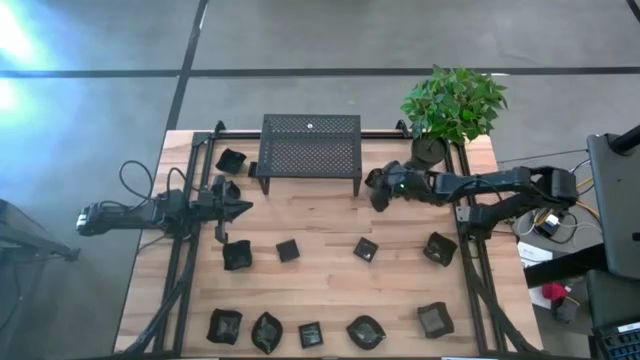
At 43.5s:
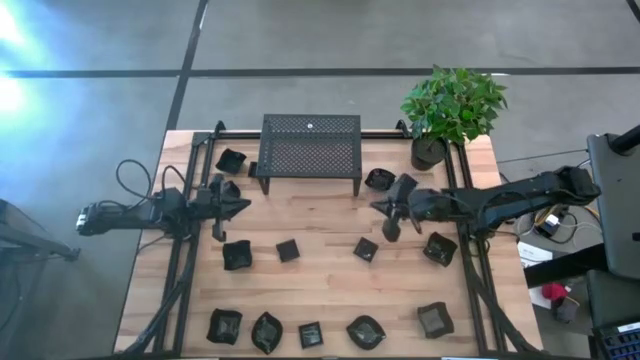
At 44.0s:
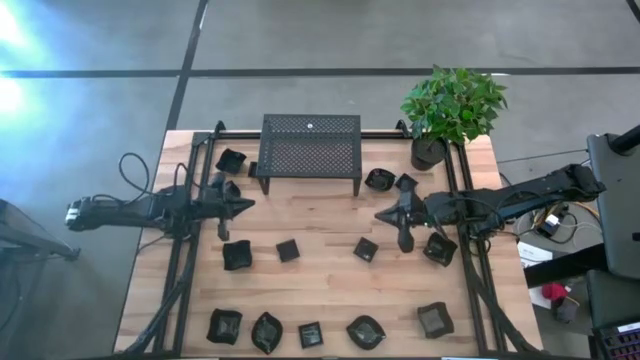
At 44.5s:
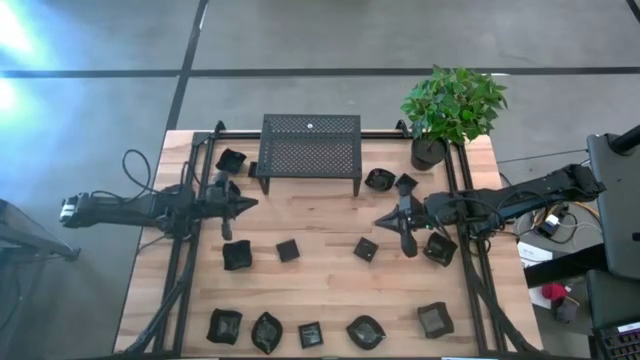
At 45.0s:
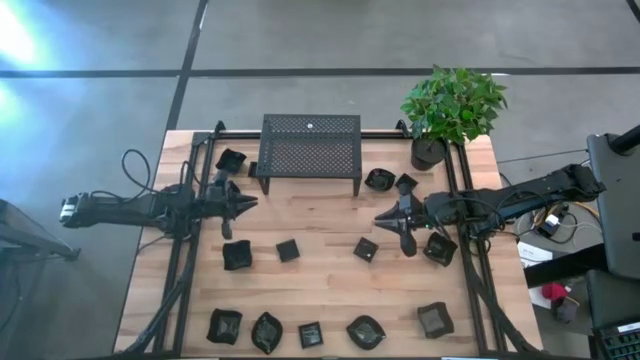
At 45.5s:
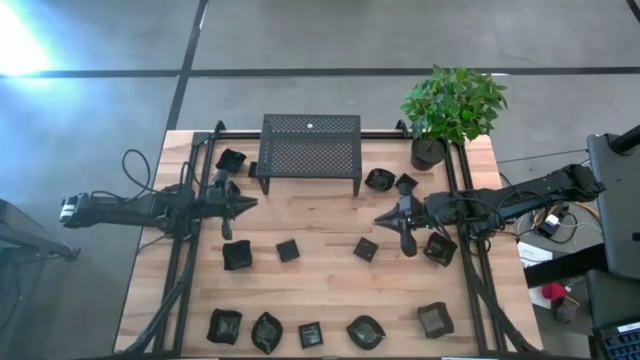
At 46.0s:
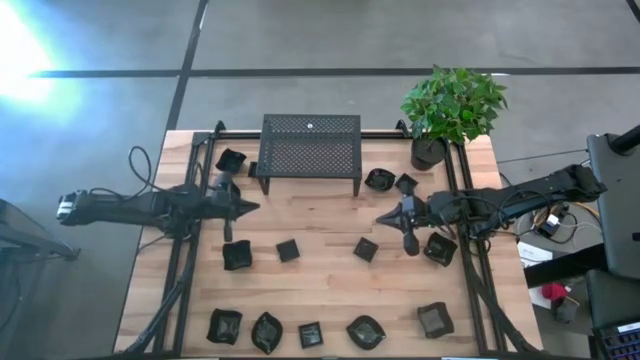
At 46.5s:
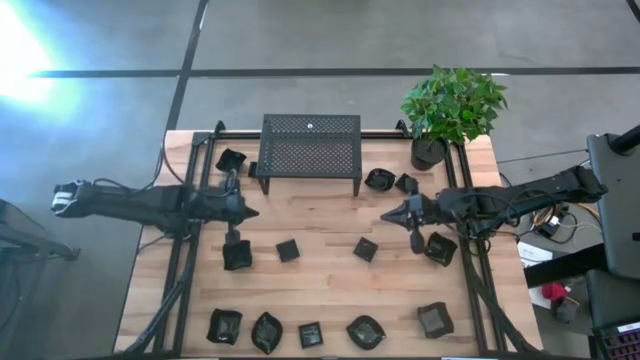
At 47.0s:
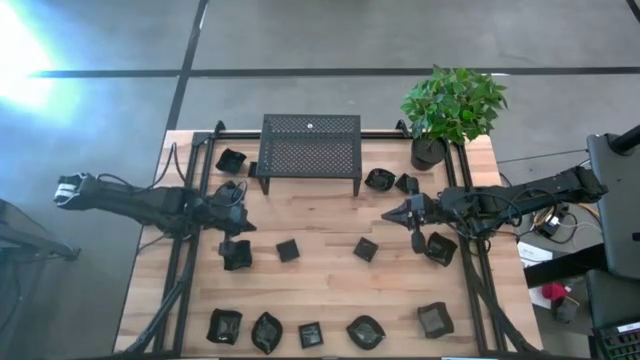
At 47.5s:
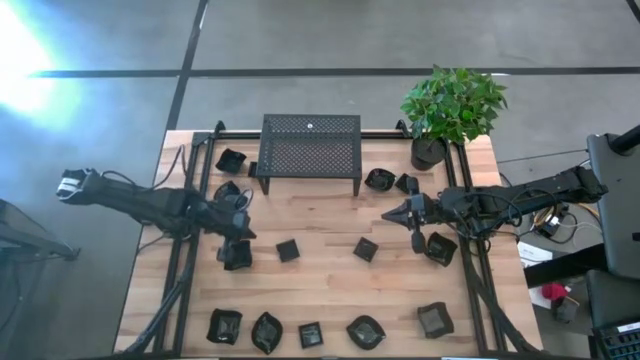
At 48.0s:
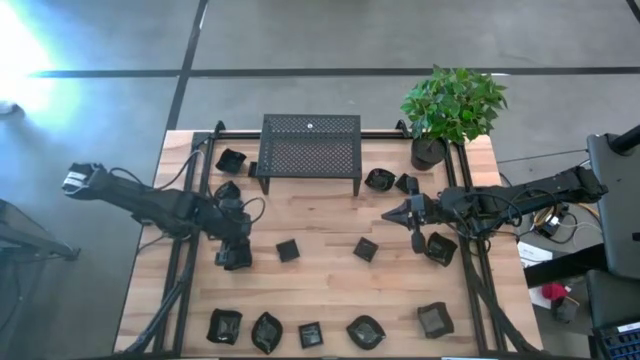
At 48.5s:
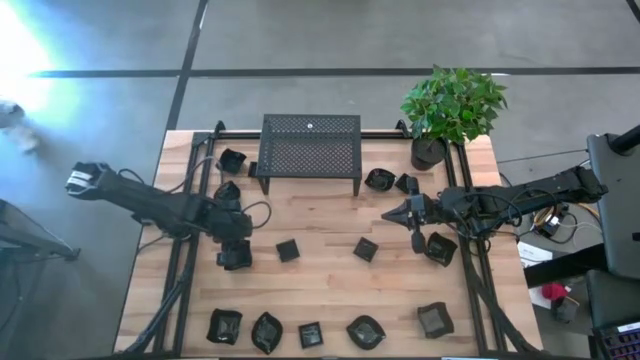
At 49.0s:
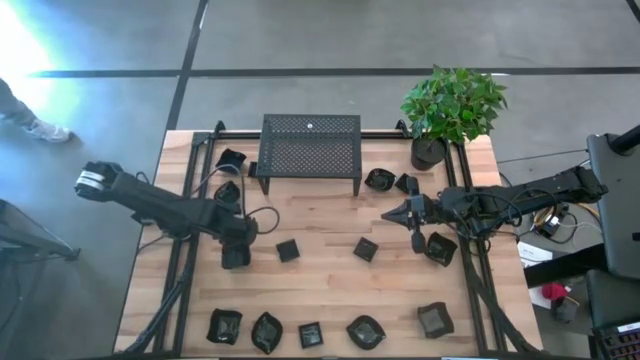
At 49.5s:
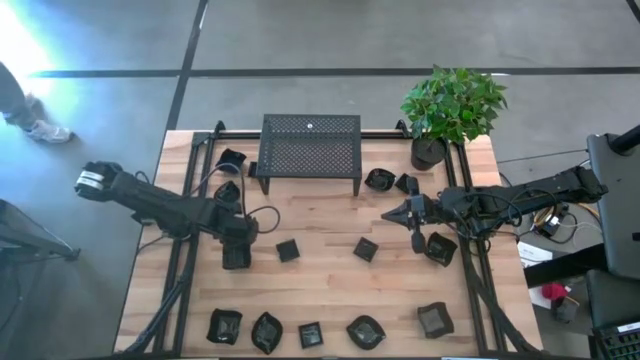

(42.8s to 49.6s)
Task: Pick & Place Mini shaped plates
Stack the black distorted square plate on top of the other black distorted square plate

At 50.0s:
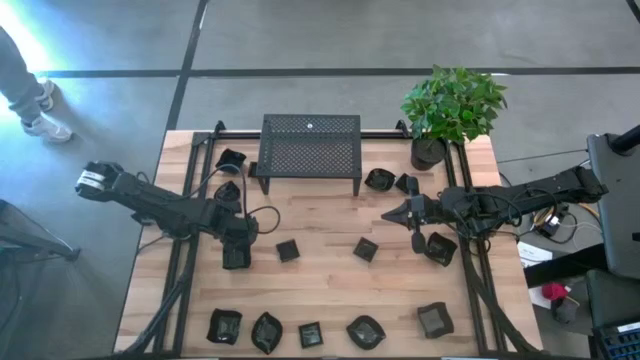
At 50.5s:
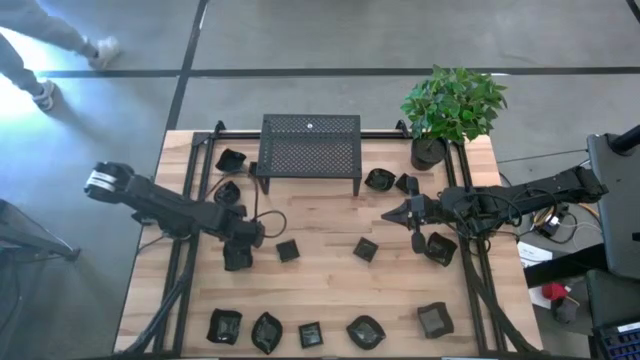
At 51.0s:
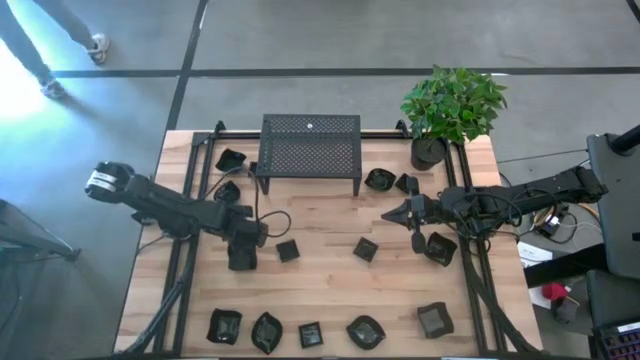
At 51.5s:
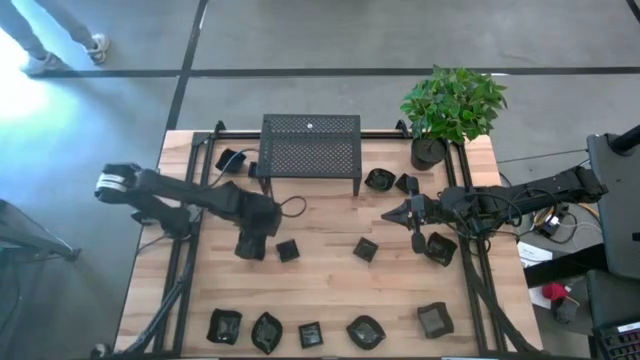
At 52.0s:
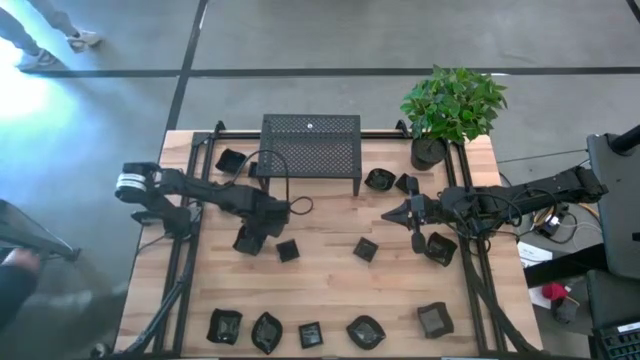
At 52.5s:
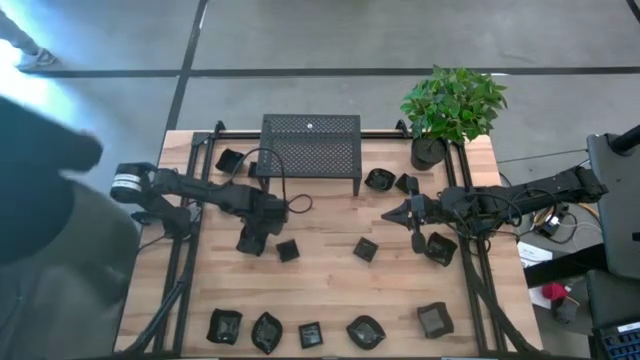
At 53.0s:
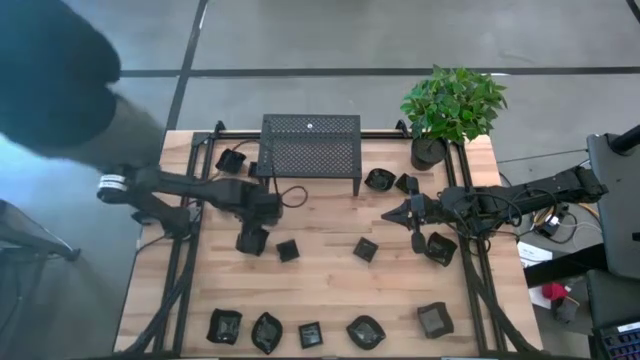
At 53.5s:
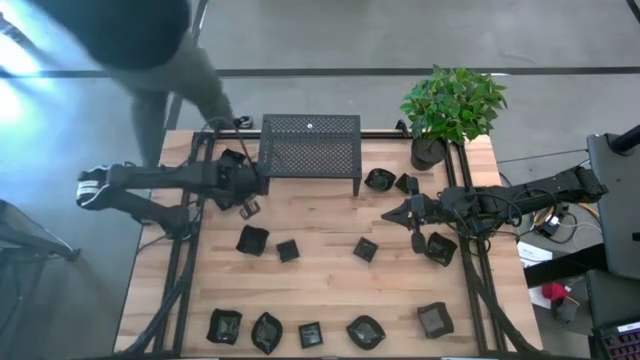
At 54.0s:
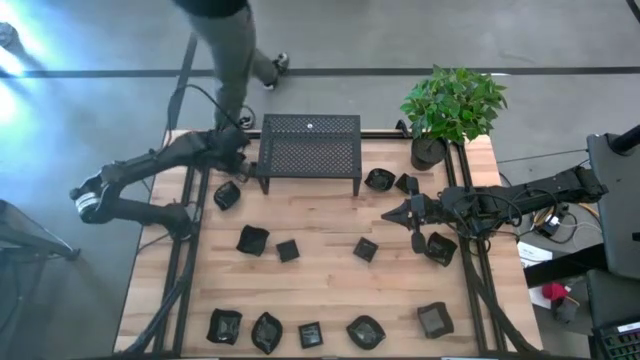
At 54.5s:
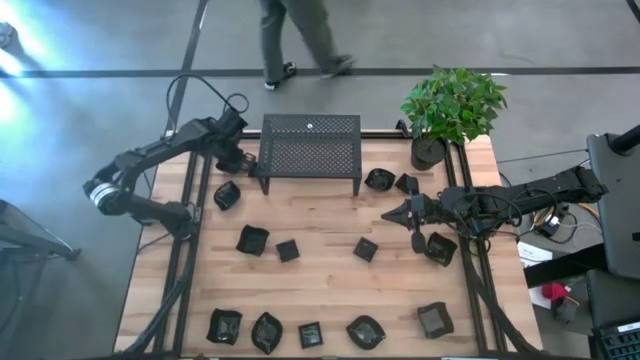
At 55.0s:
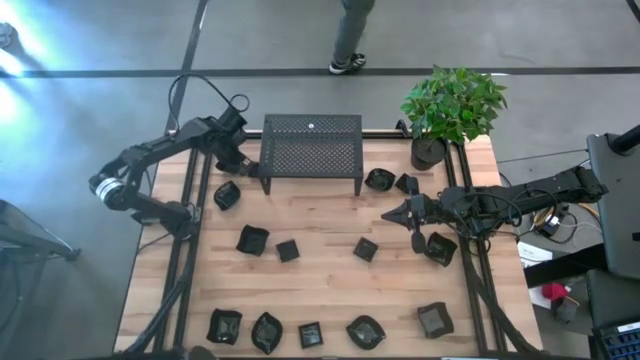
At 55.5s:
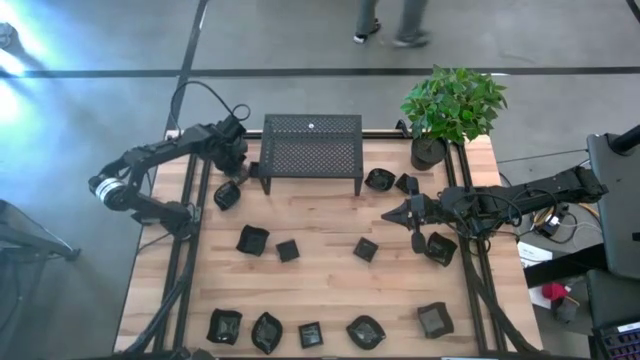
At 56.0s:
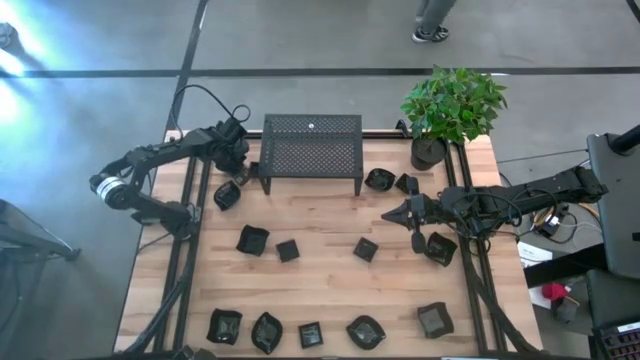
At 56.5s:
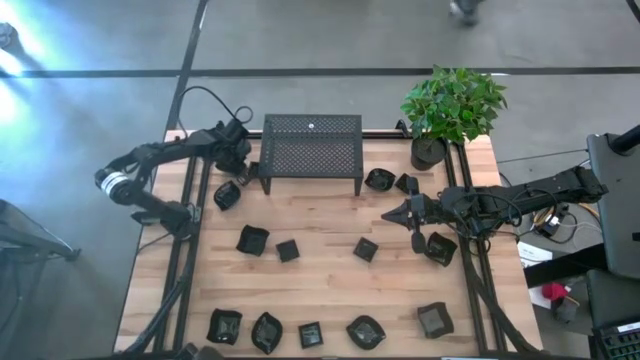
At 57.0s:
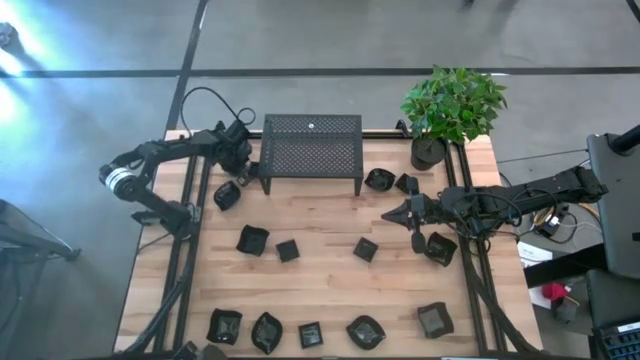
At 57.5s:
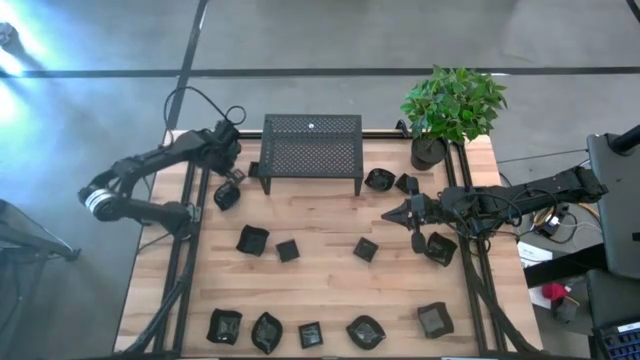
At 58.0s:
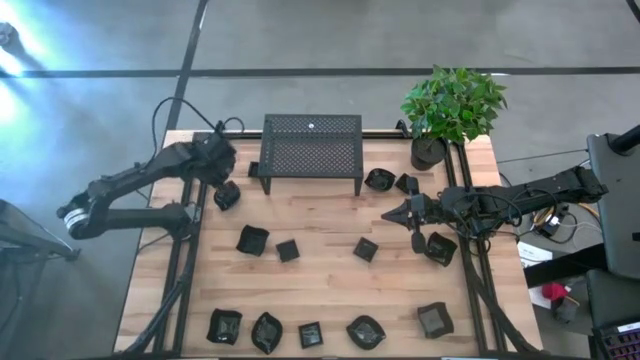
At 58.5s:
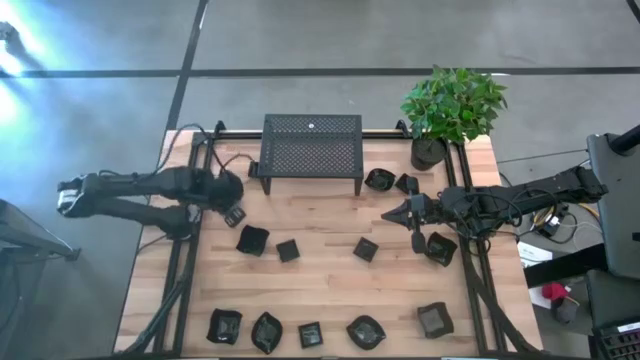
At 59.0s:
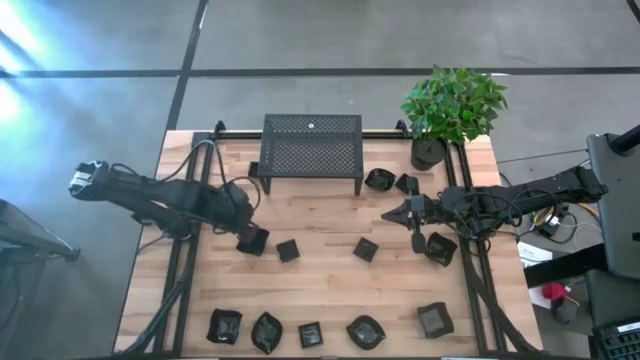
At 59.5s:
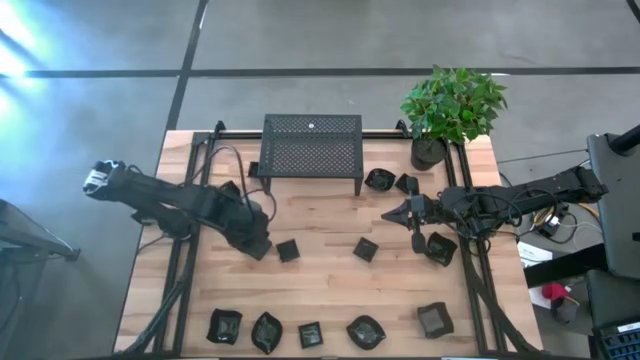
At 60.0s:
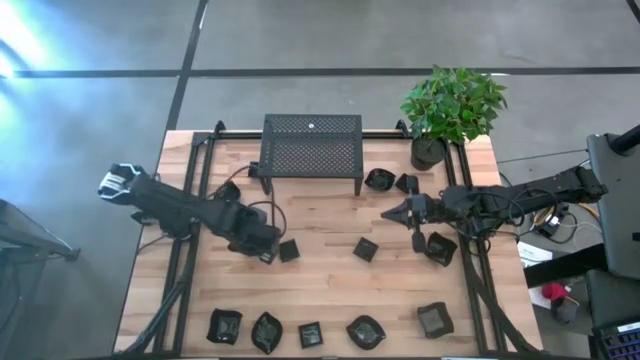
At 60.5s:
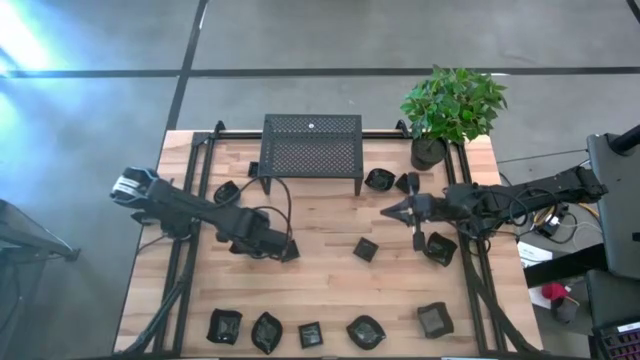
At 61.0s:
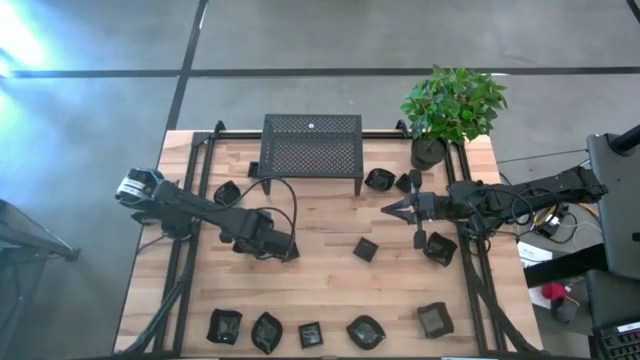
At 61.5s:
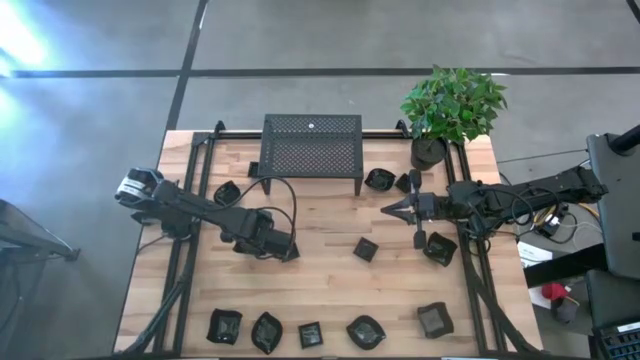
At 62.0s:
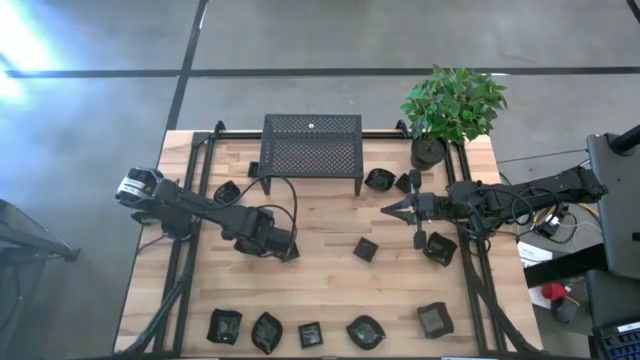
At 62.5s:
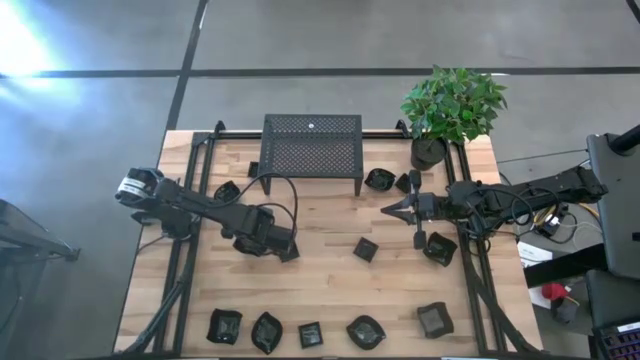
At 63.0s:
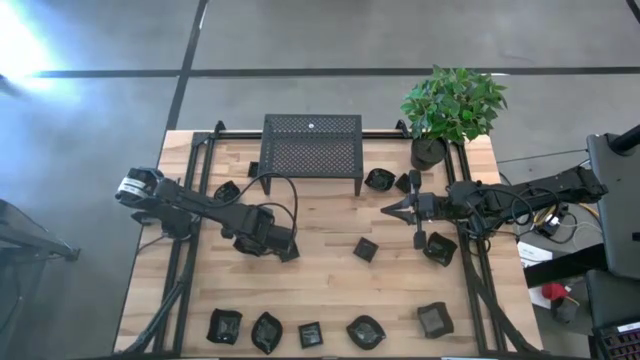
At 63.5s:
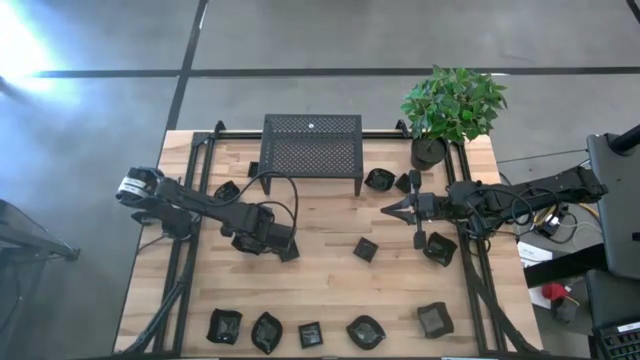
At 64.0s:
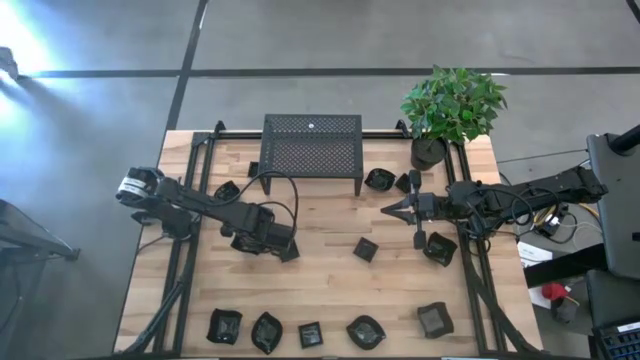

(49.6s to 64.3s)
Stack the black distorted square plate on top of the other black distorted square plate
